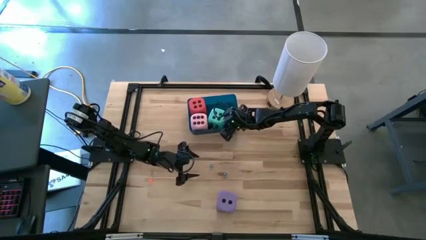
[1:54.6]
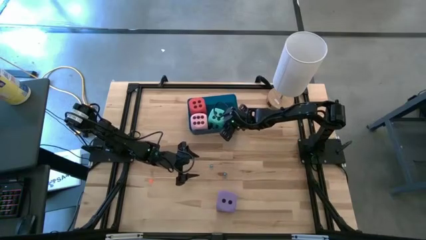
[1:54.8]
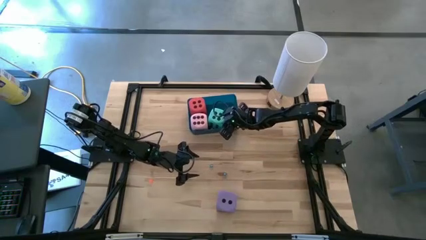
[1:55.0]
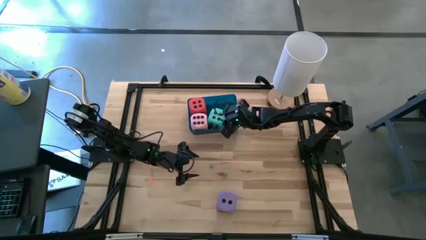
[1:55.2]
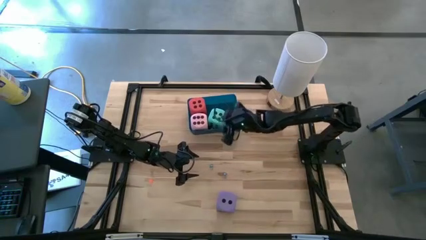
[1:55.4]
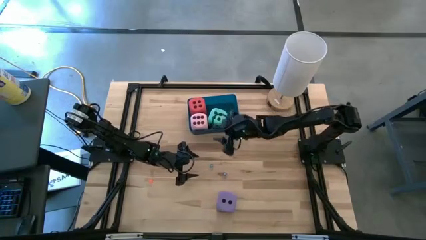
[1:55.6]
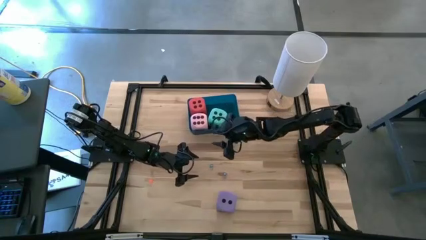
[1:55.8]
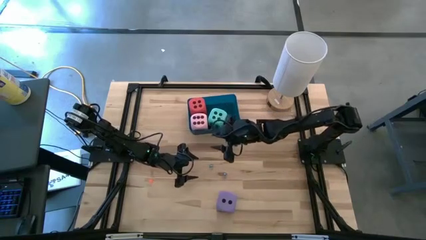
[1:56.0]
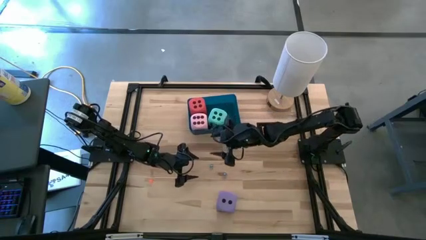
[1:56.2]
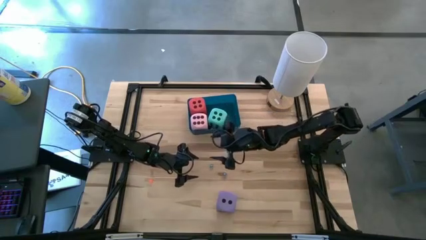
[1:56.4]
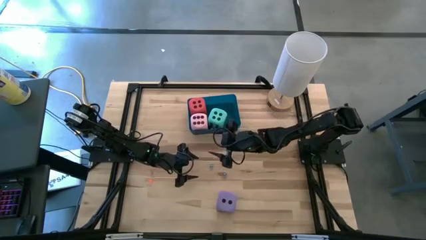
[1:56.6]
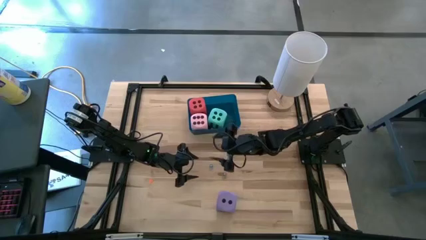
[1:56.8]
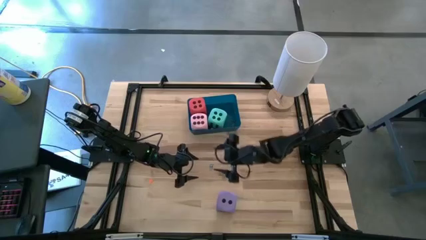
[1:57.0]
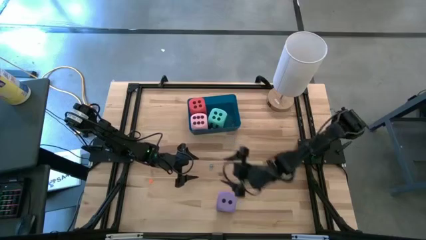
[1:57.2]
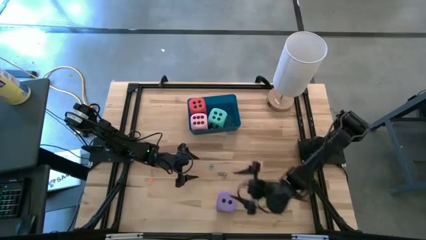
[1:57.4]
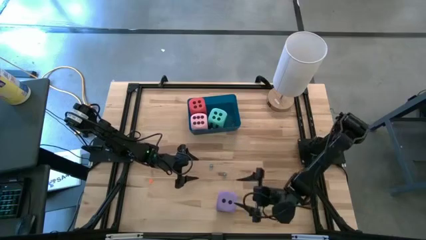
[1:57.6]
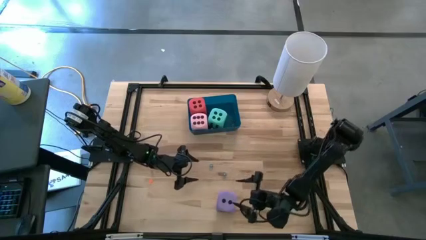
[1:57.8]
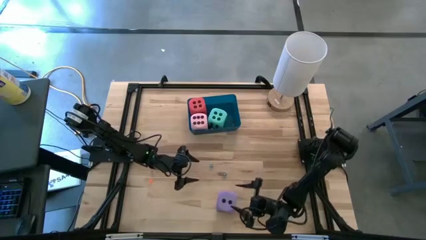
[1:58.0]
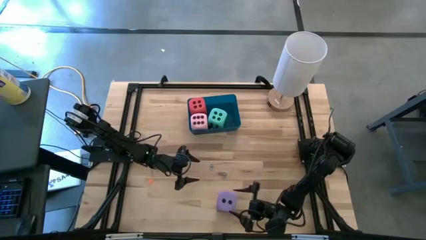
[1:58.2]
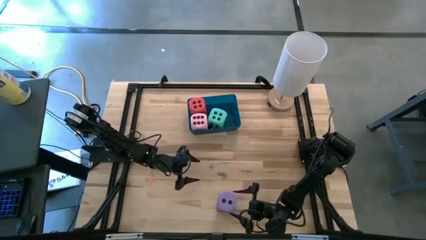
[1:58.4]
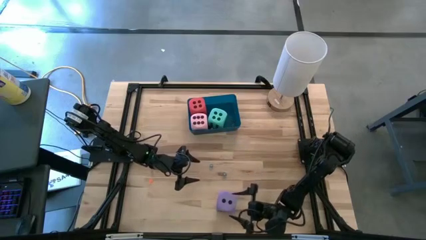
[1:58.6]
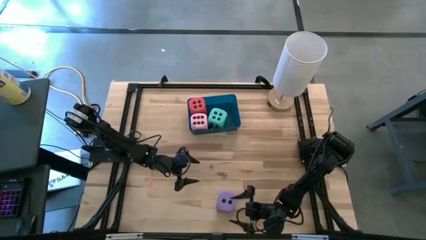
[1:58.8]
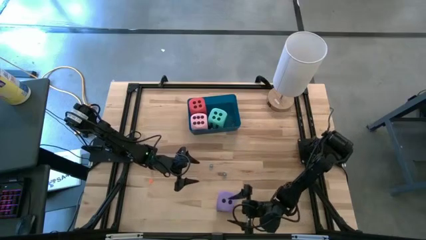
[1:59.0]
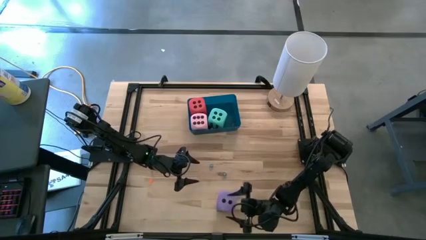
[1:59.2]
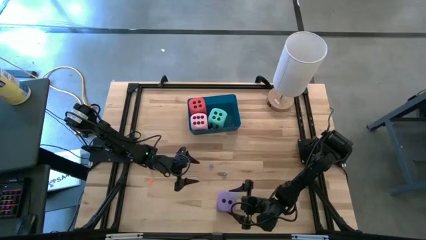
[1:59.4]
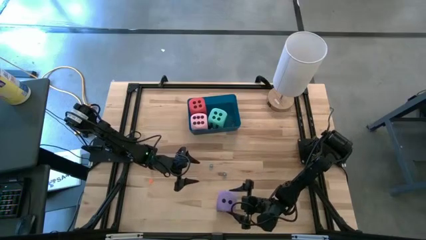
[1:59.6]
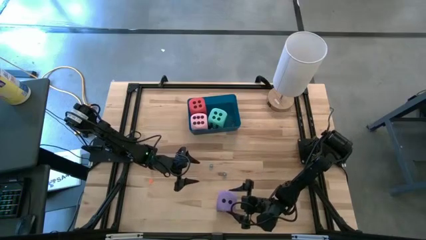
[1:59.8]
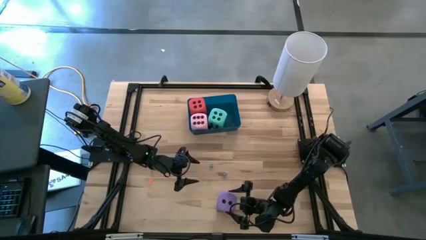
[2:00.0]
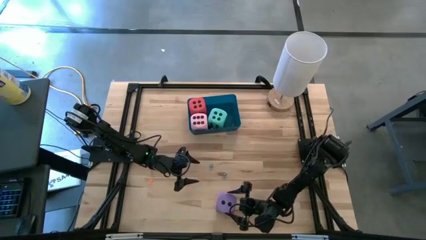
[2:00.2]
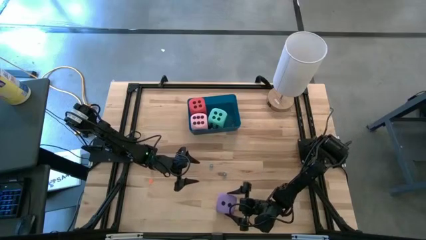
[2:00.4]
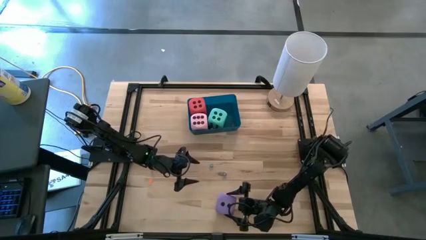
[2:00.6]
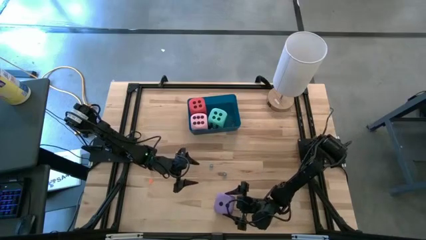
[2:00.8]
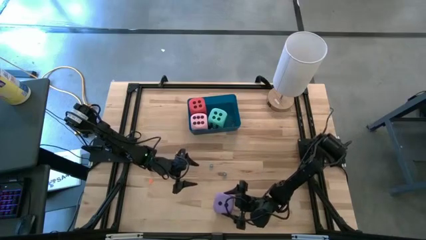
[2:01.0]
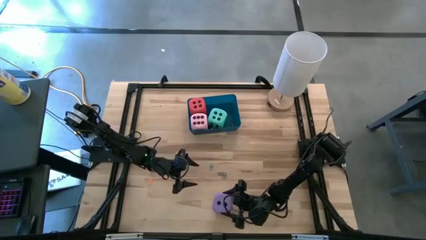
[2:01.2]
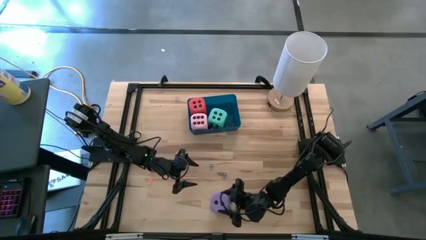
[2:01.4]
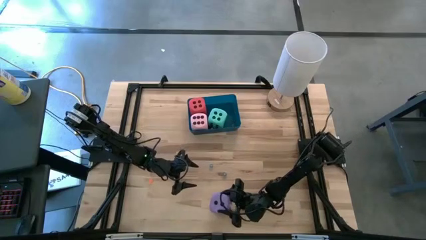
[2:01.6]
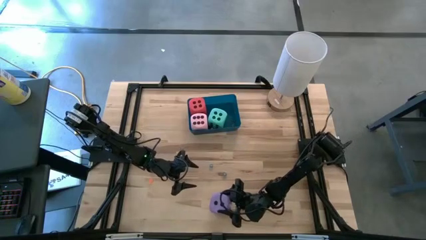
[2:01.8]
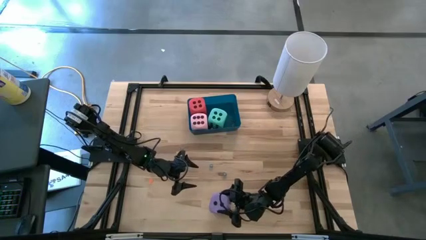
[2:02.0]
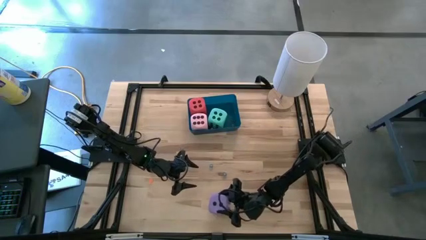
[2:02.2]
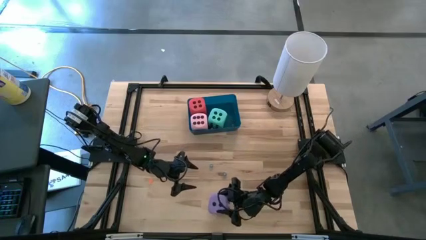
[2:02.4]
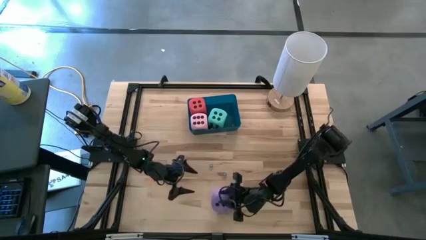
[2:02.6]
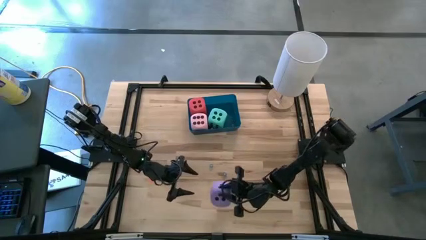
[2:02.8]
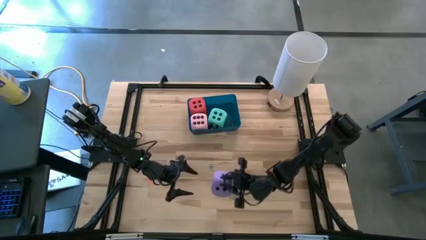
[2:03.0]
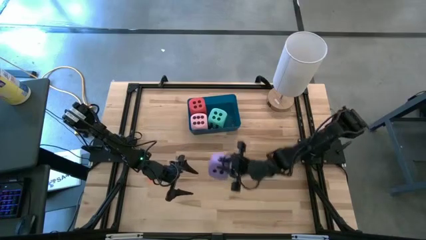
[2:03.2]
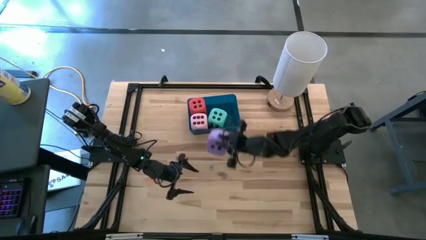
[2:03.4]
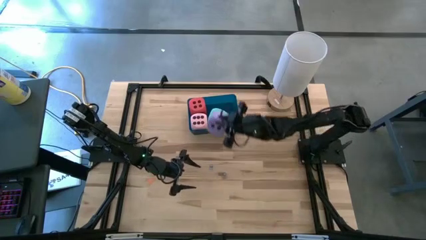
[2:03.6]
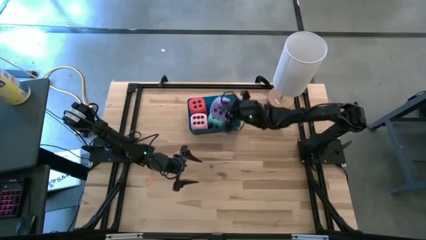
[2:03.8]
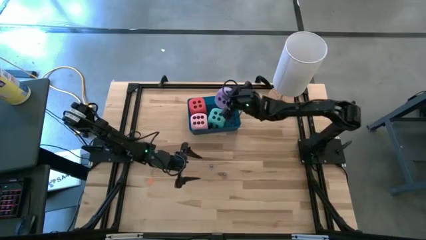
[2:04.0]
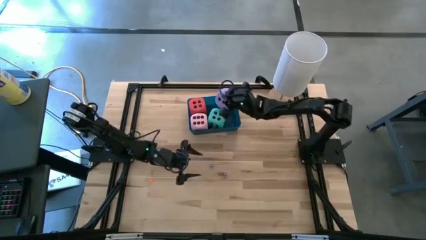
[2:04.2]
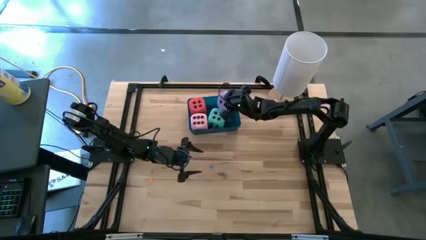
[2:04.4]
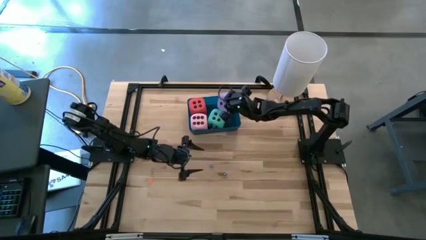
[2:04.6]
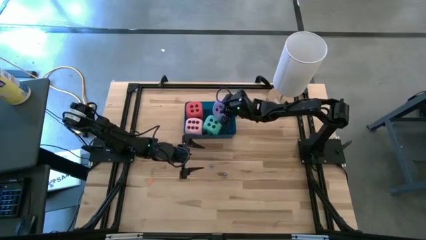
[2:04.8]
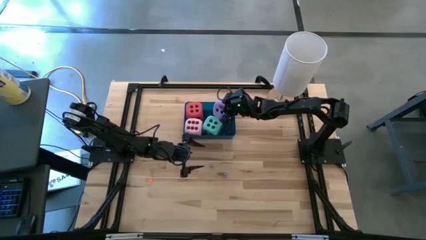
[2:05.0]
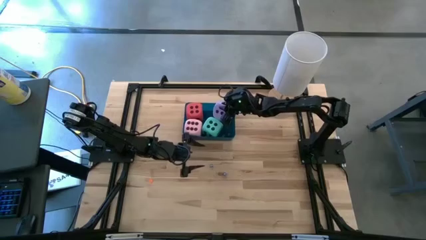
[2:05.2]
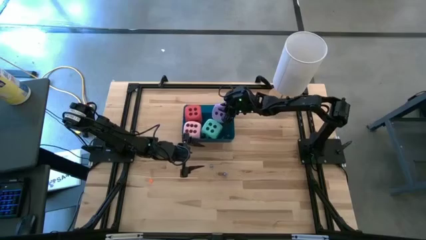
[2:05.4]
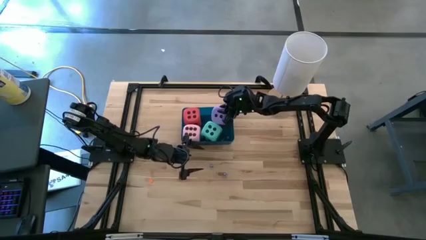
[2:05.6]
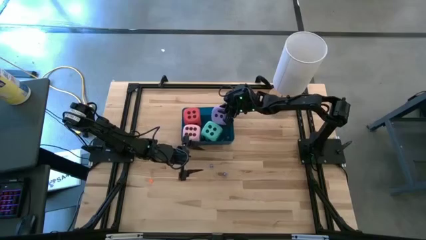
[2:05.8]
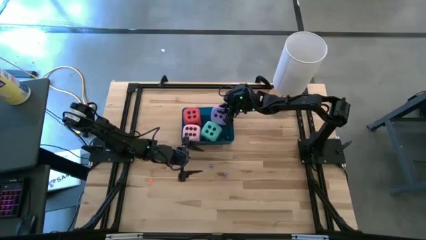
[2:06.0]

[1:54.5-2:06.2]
Task: Pick & Place Dice
Put the large purple dice into the blue bin

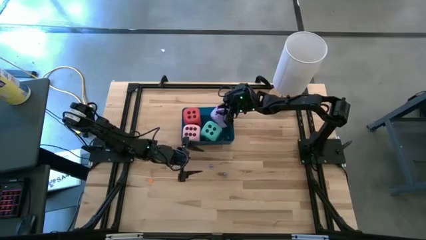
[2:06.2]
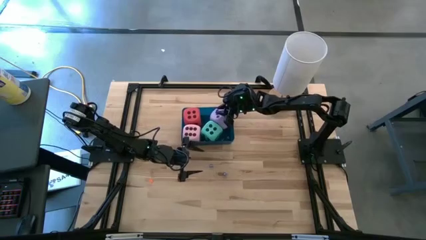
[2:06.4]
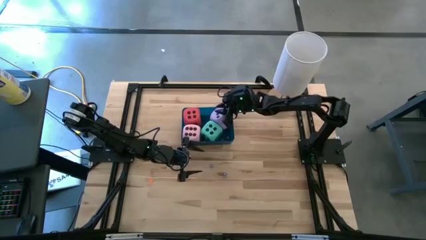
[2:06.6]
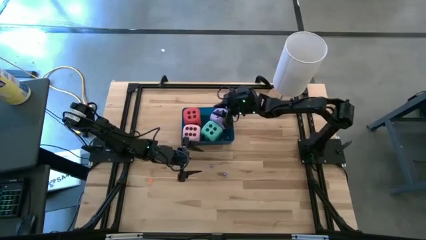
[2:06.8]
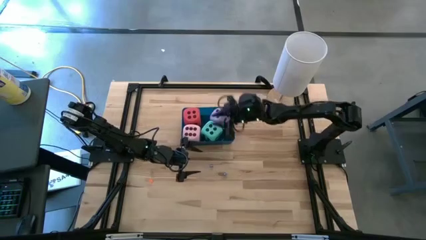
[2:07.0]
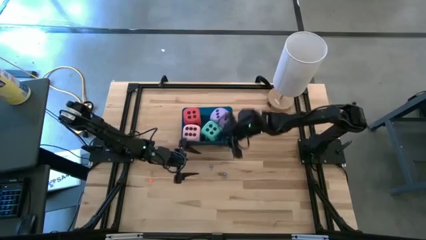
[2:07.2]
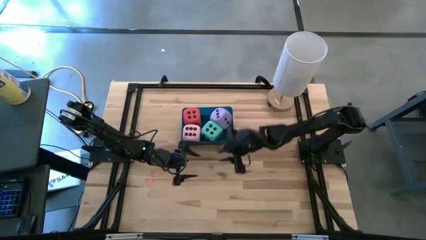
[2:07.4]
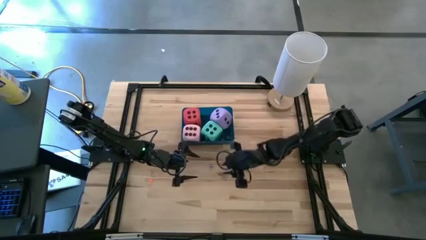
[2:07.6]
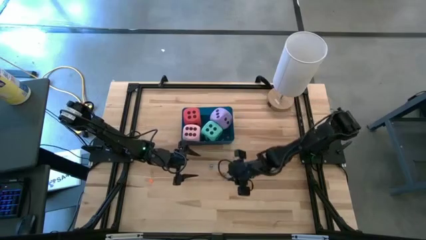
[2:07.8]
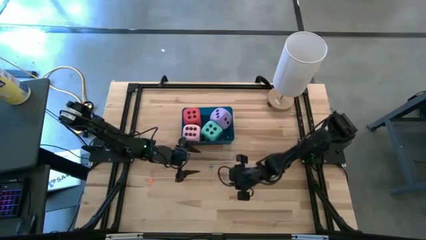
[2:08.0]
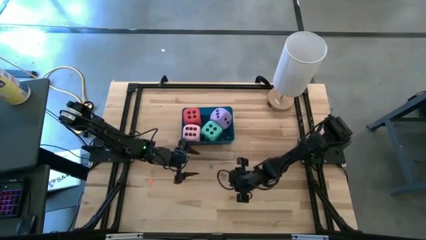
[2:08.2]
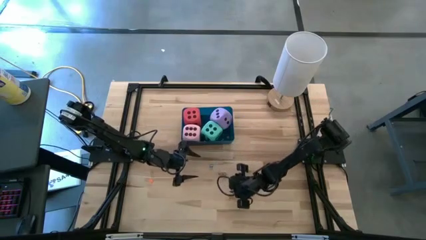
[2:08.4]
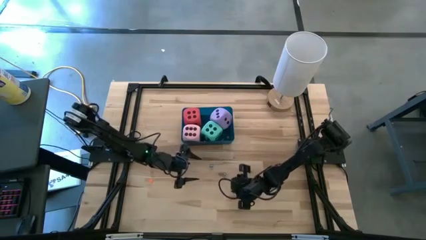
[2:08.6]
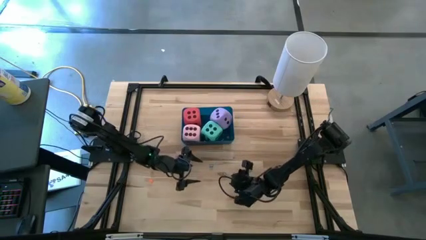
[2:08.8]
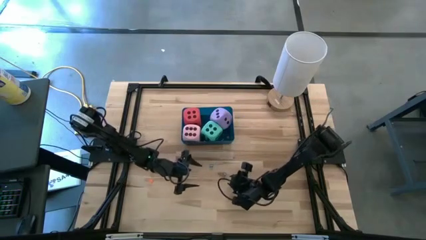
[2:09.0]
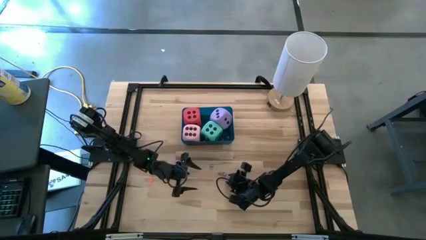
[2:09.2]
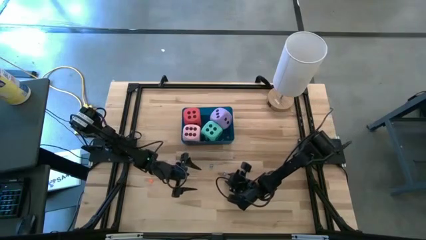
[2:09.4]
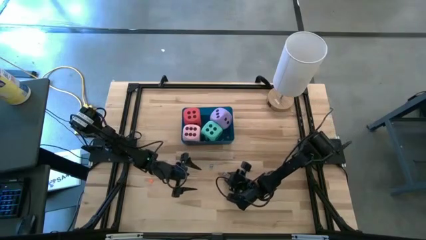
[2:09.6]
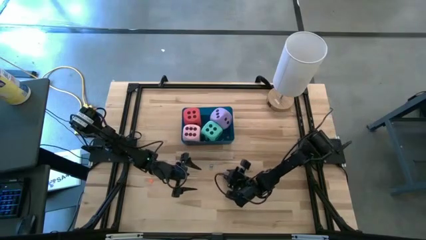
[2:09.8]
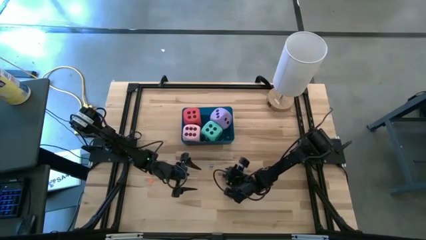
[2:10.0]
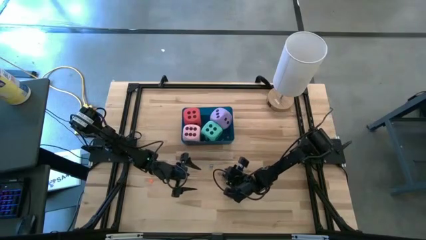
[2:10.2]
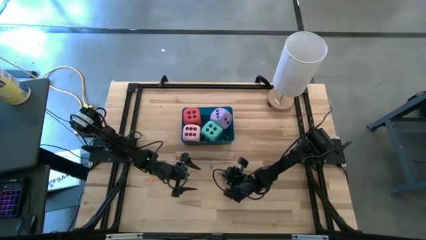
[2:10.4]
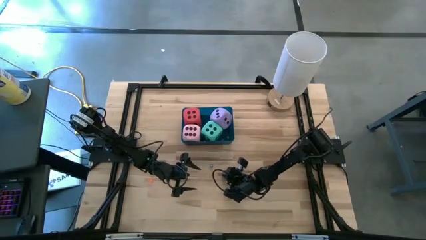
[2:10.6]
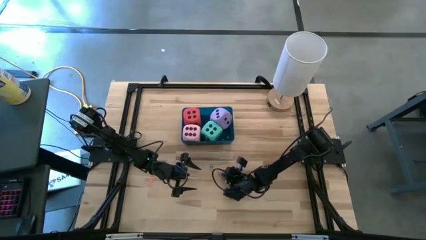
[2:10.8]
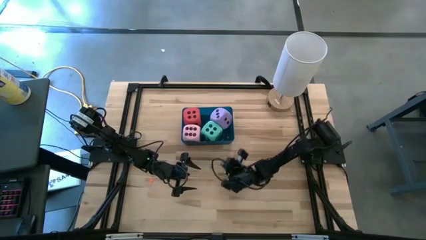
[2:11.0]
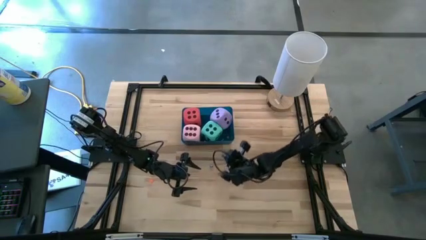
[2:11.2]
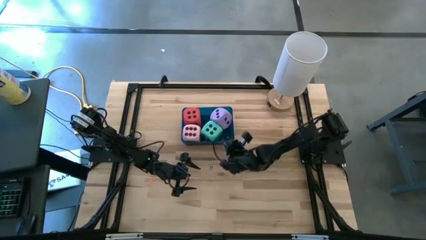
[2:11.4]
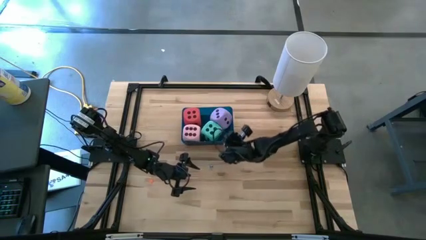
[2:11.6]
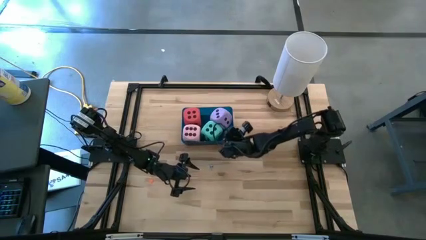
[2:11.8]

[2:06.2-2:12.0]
Put the small blue dice into the blue bin
